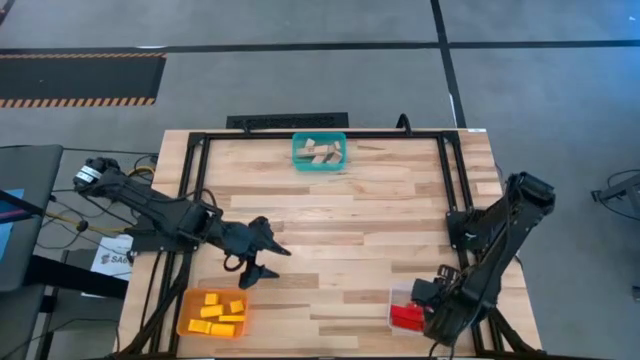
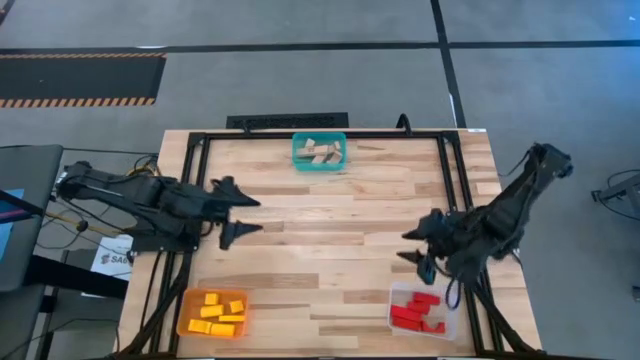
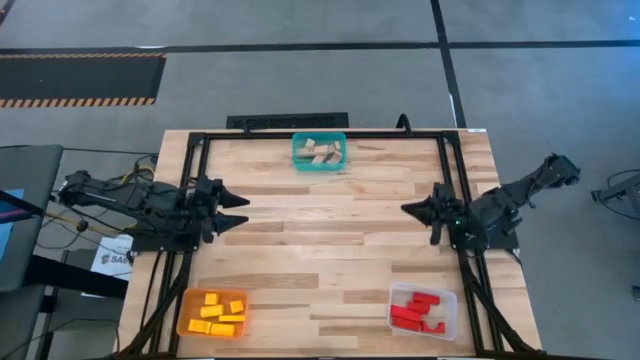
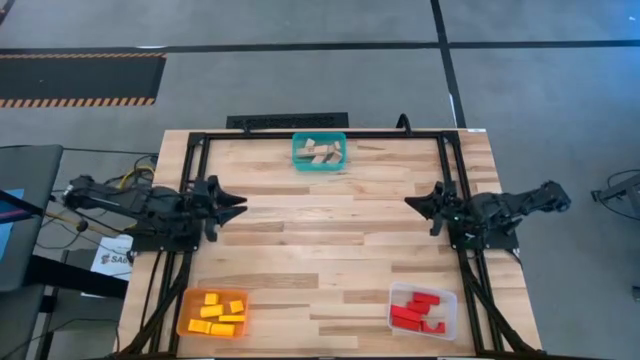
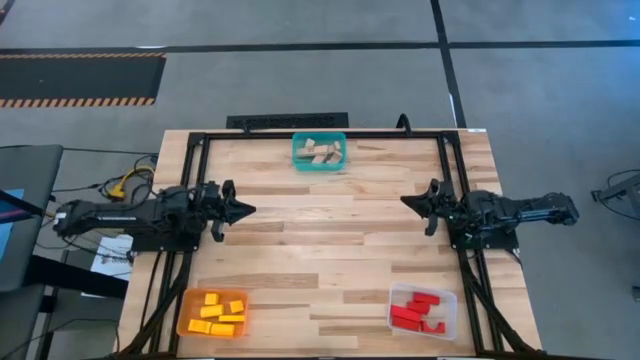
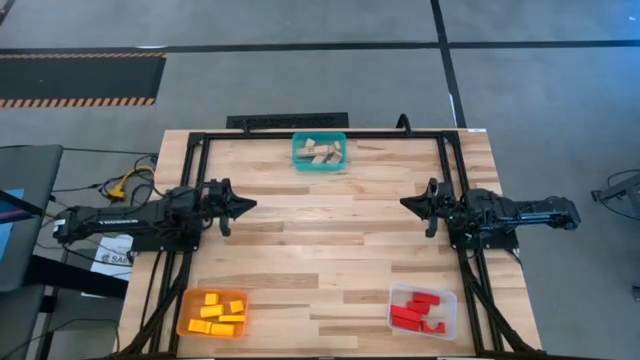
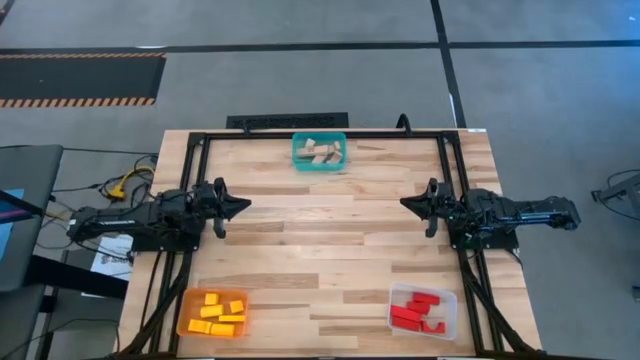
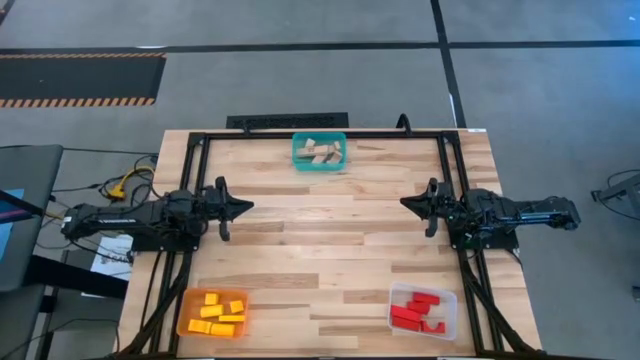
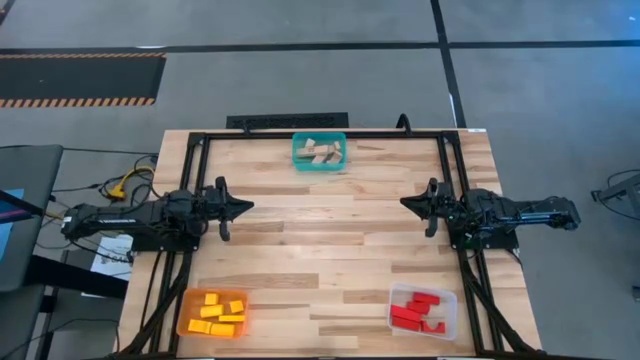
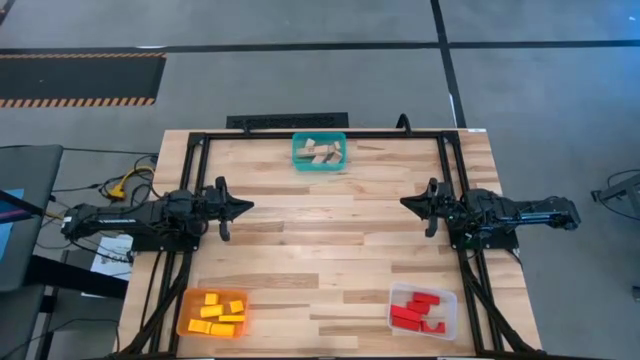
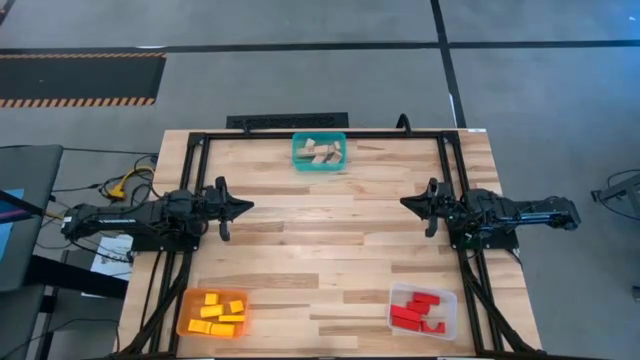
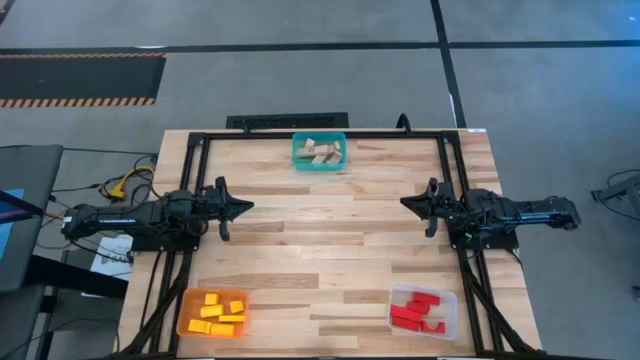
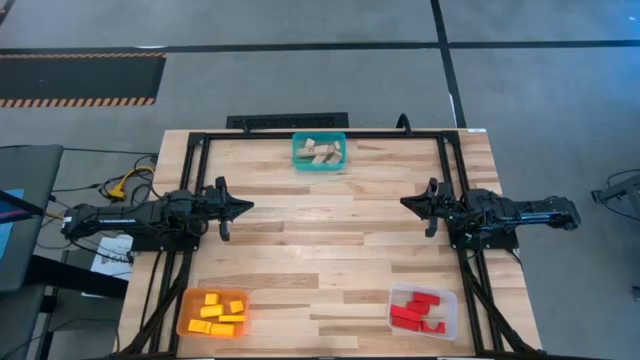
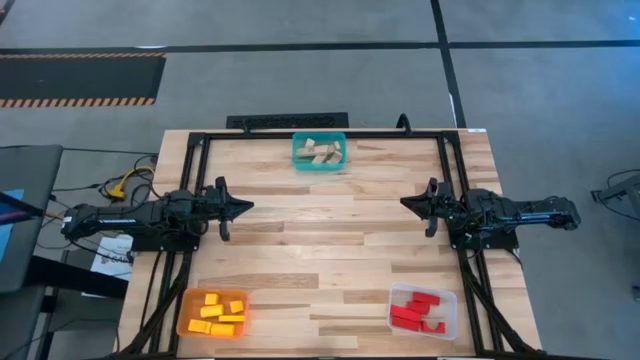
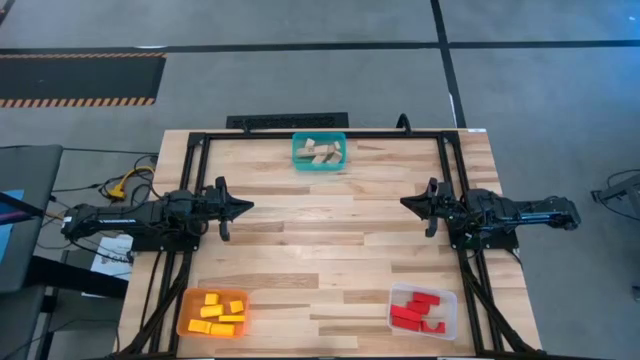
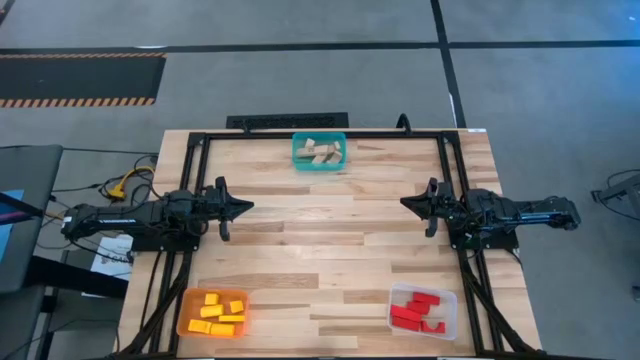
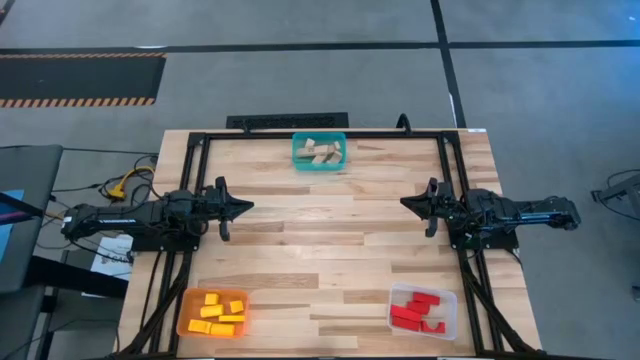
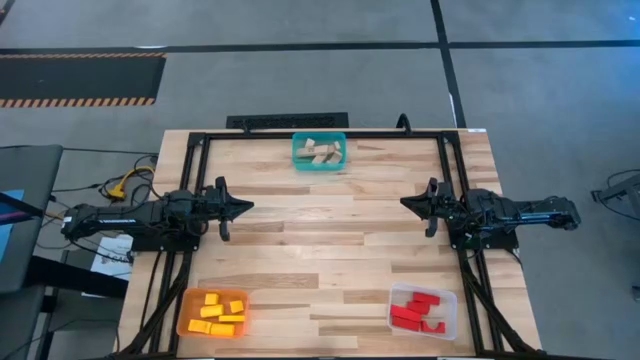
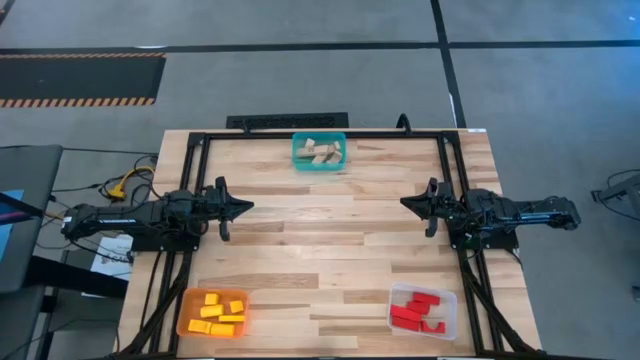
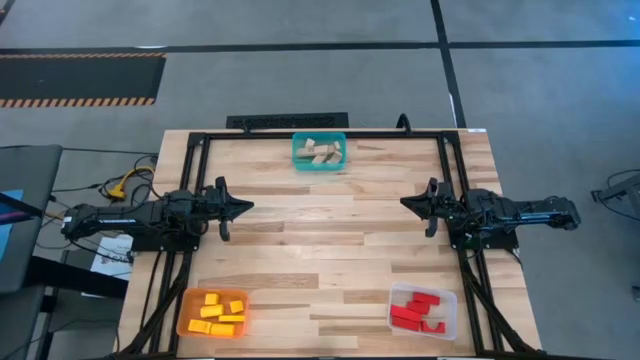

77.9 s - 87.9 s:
Task: Sort & place blocks by color
Return to Home Position

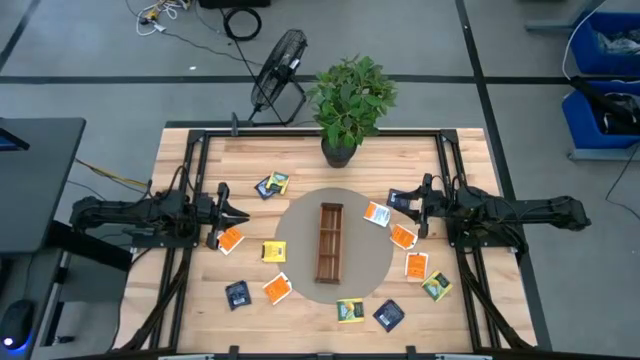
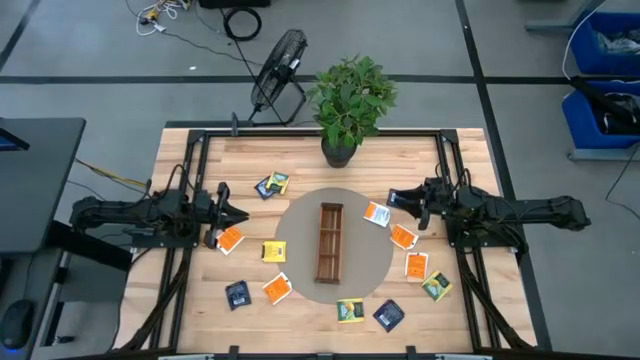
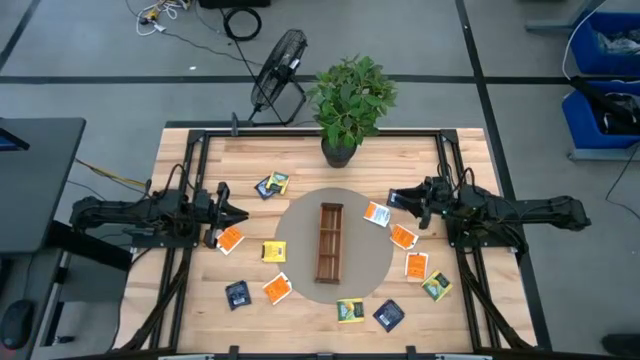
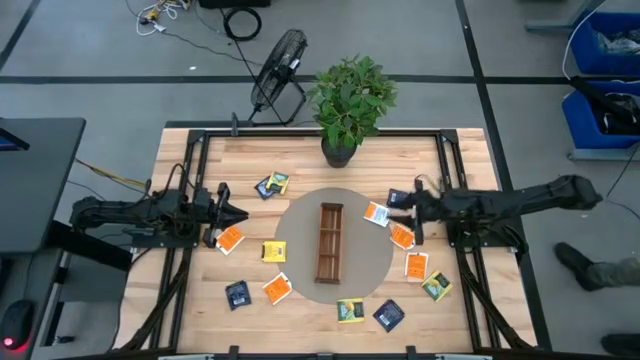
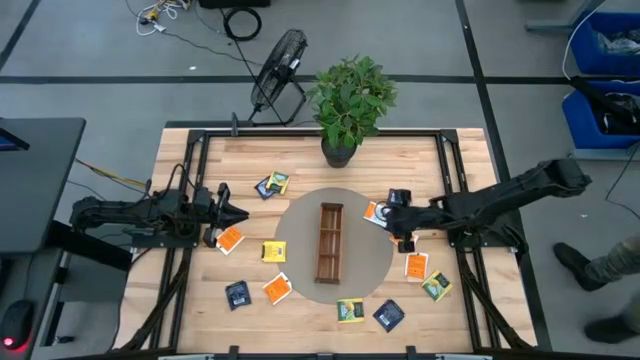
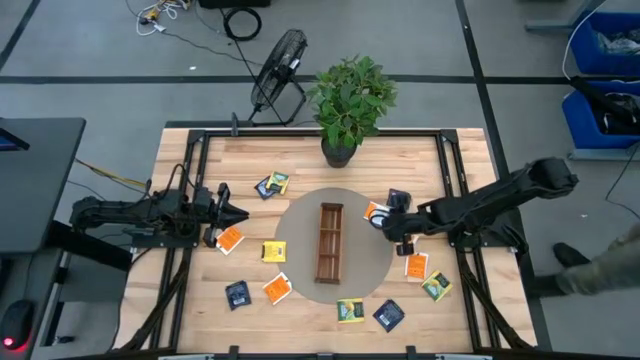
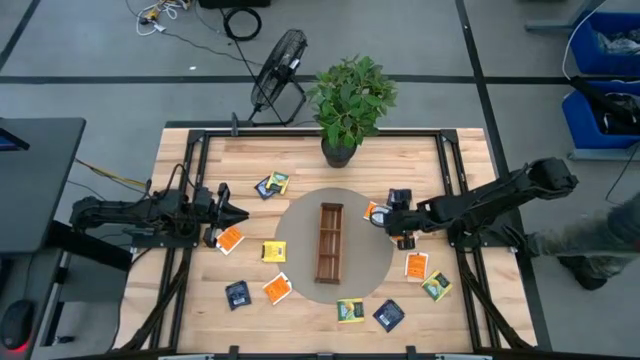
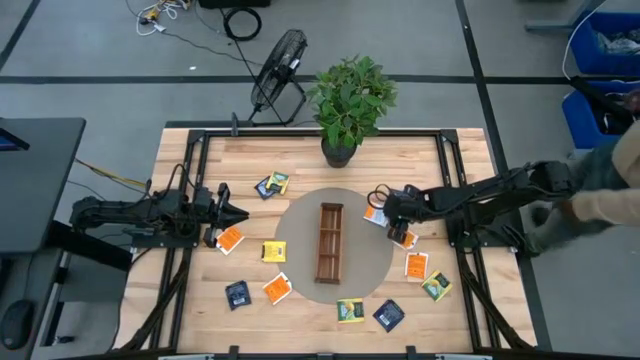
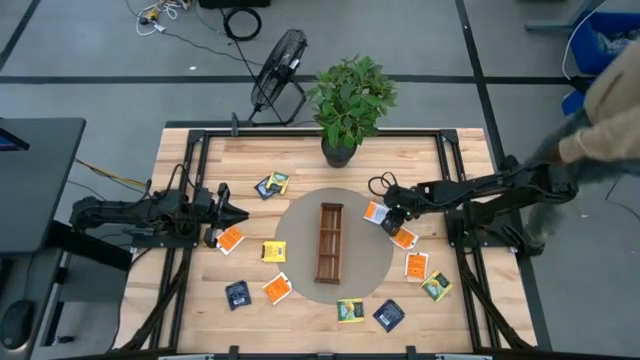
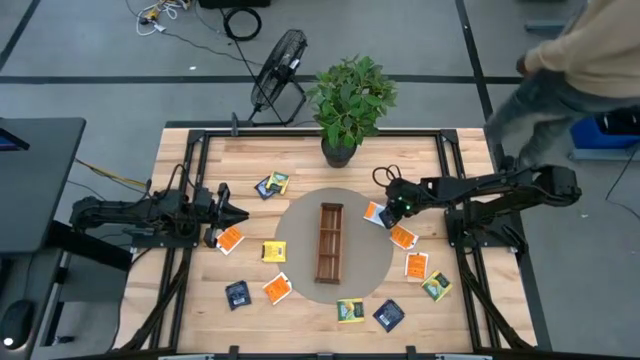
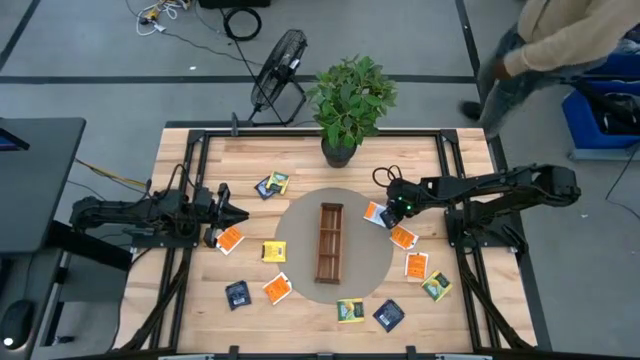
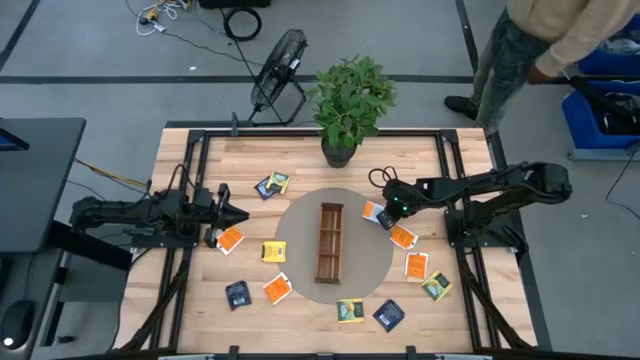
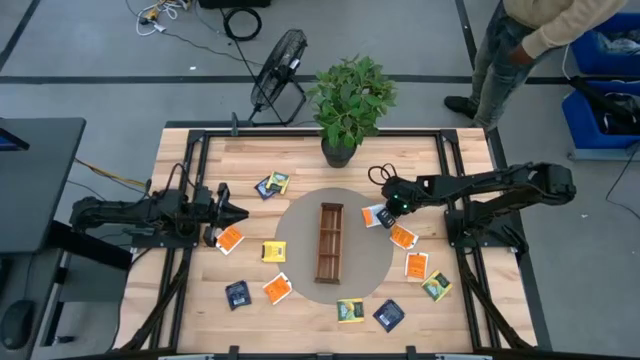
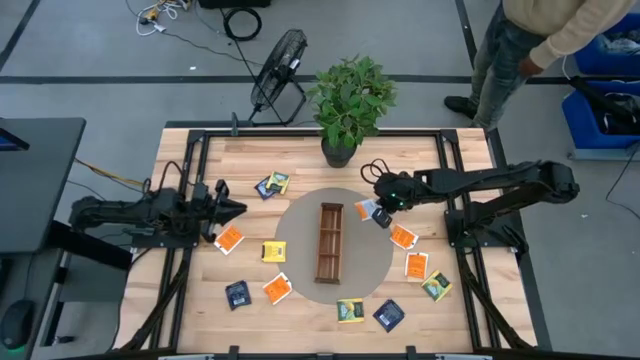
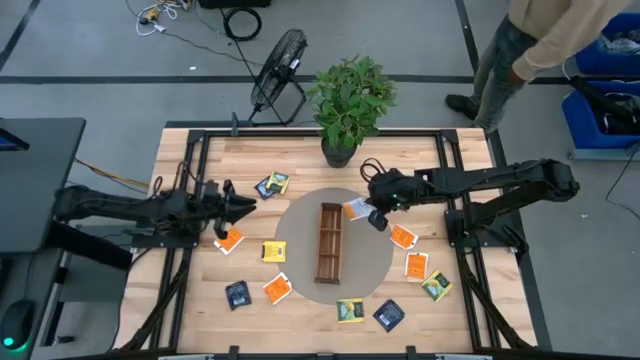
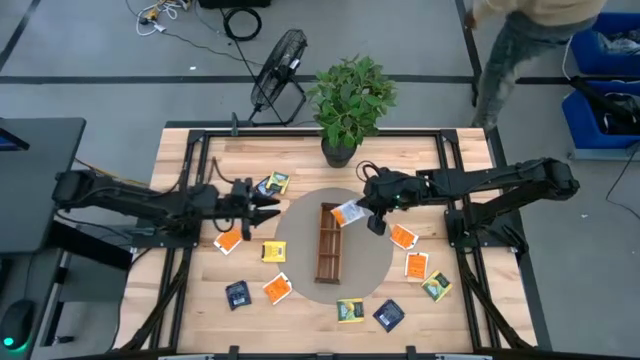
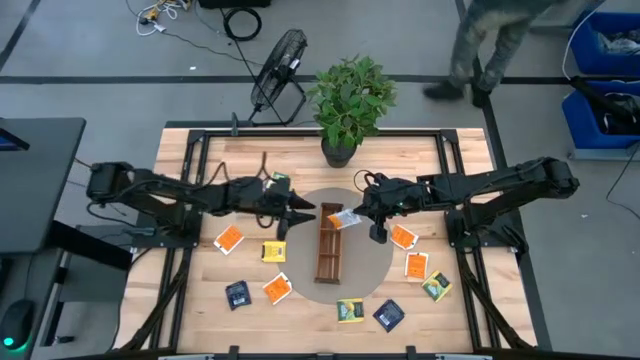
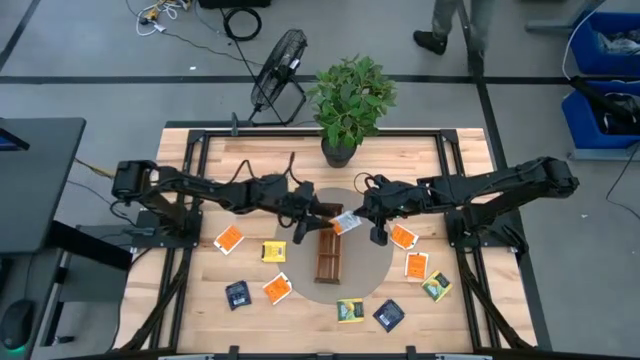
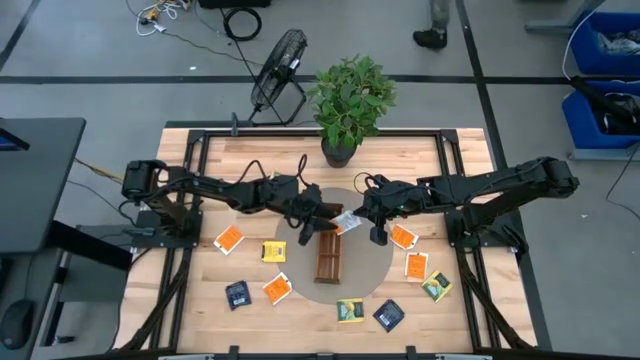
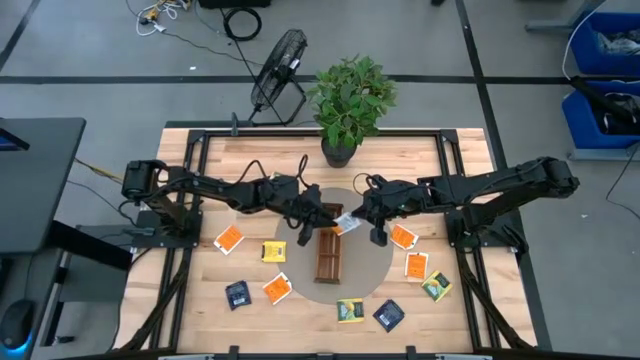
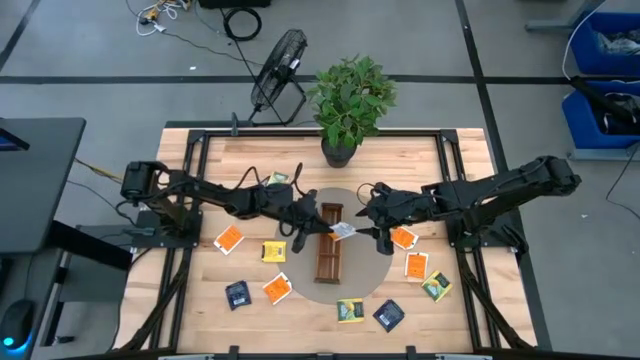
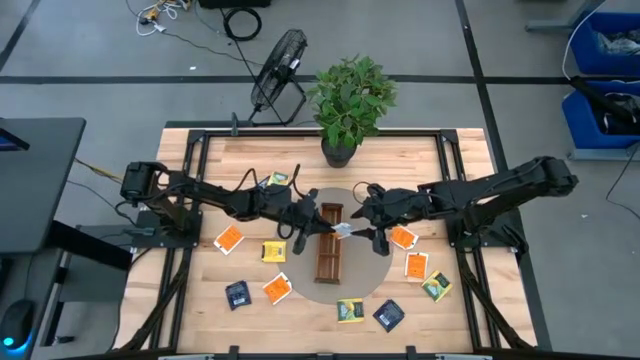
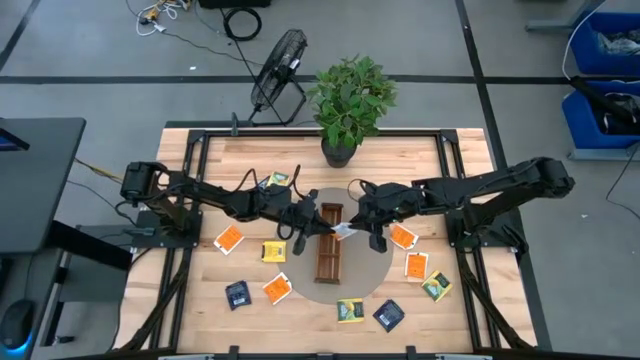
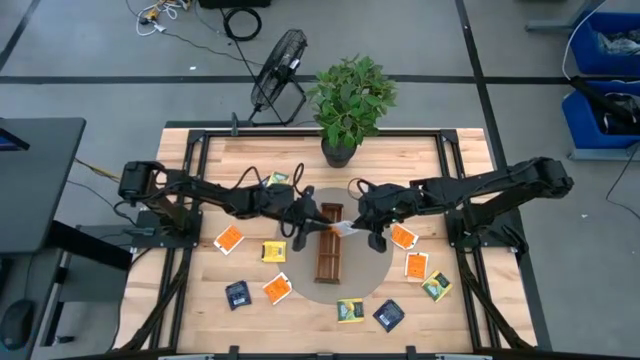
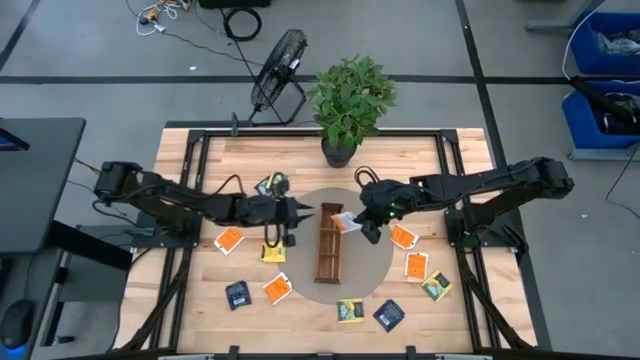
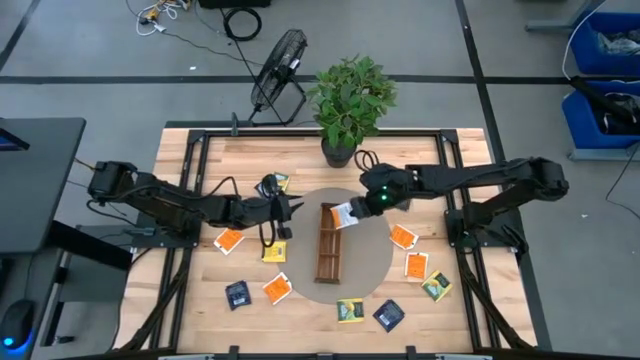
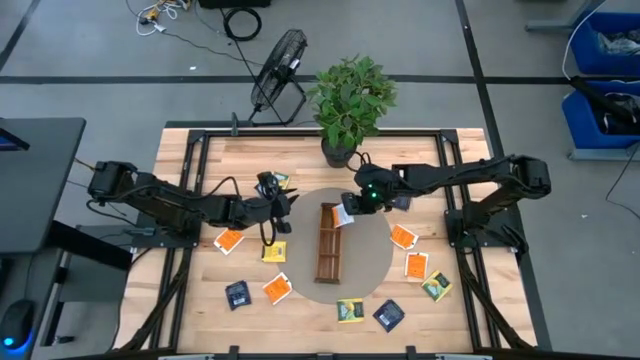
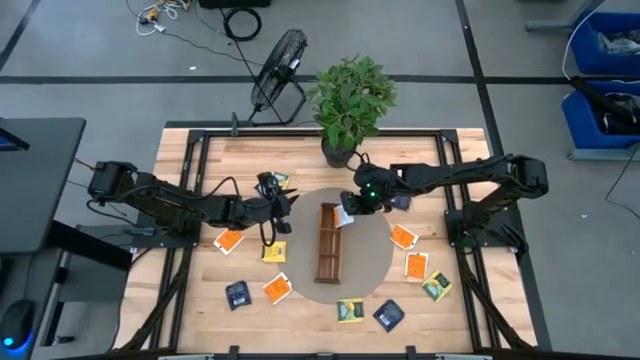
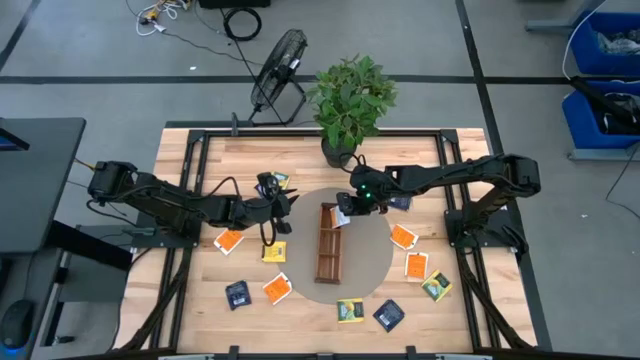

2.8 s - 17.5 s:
Task: Pick & Place Tea
Put the orange tea bag into the top compartment of the top section wooden organizer
